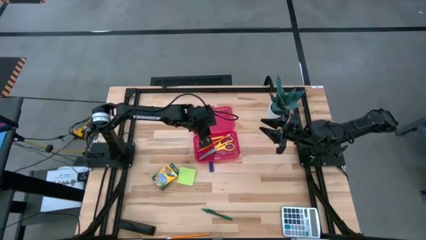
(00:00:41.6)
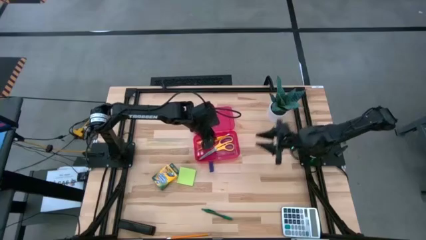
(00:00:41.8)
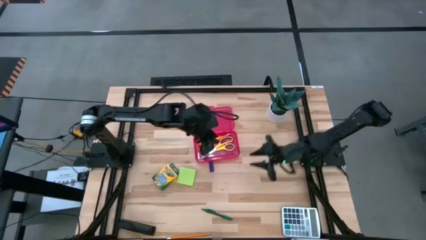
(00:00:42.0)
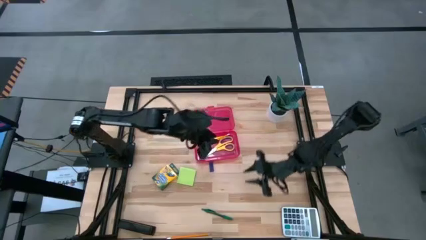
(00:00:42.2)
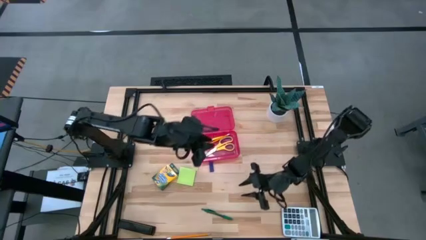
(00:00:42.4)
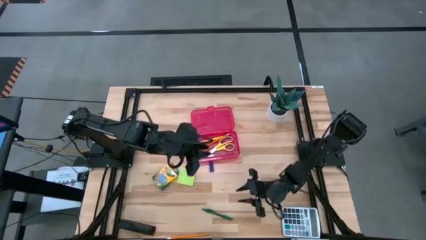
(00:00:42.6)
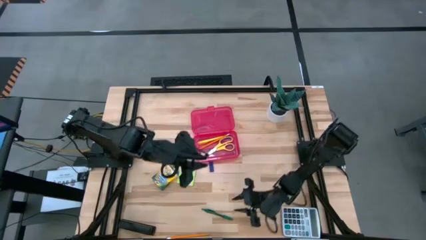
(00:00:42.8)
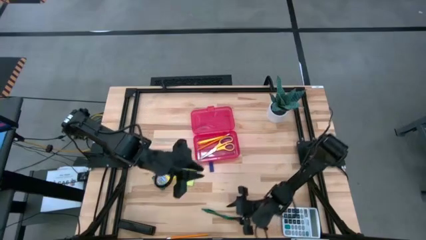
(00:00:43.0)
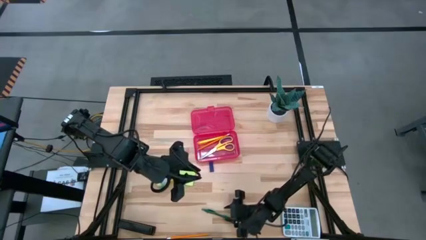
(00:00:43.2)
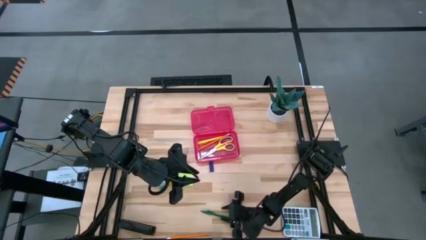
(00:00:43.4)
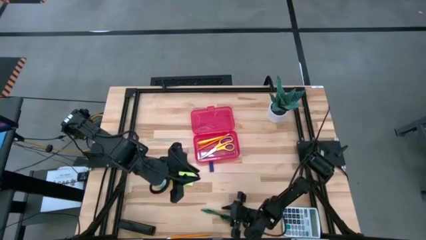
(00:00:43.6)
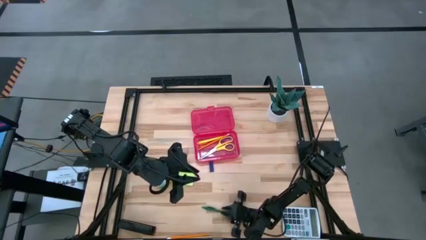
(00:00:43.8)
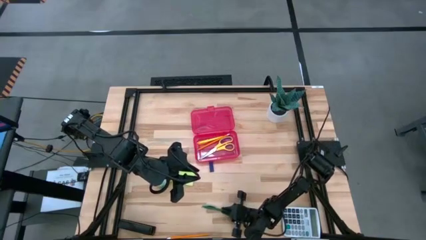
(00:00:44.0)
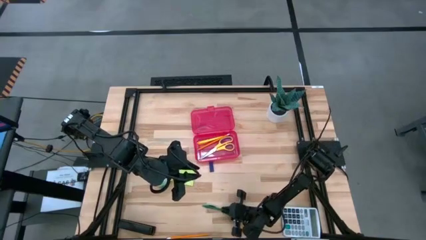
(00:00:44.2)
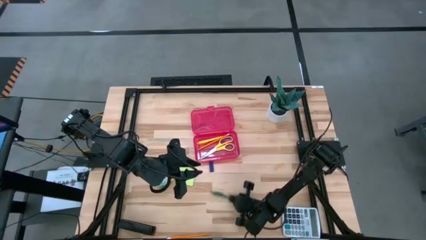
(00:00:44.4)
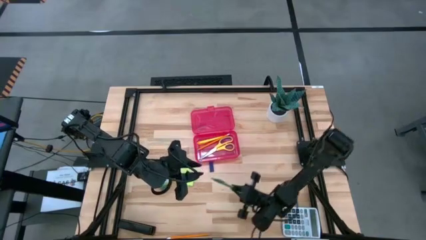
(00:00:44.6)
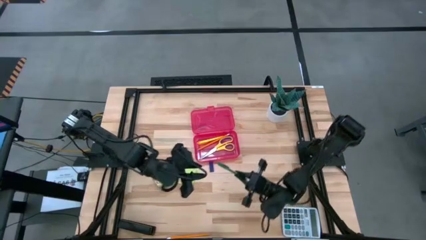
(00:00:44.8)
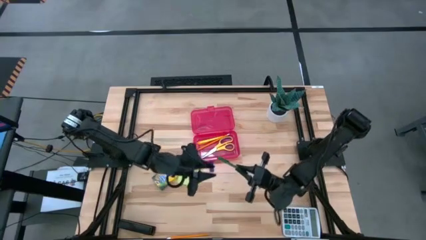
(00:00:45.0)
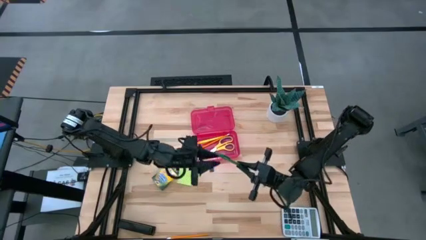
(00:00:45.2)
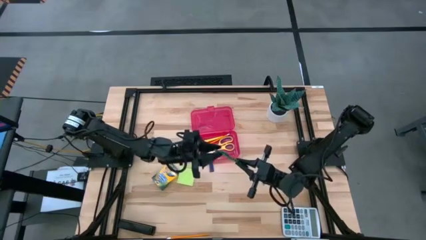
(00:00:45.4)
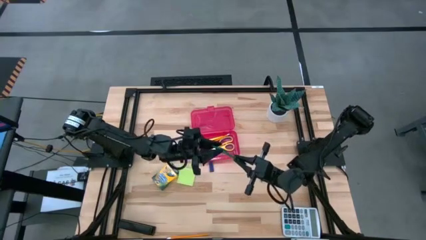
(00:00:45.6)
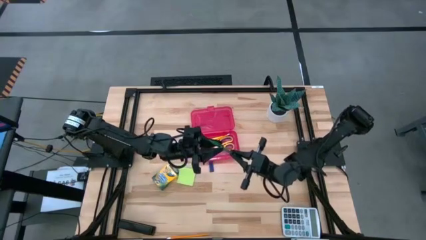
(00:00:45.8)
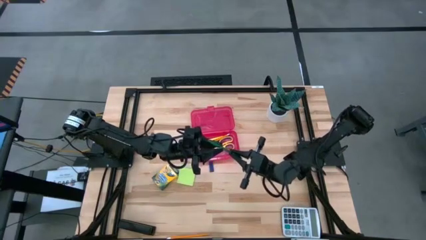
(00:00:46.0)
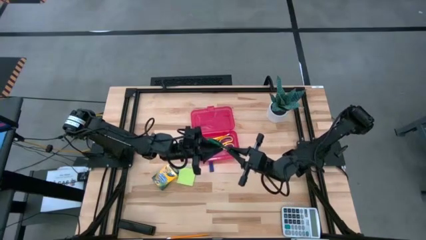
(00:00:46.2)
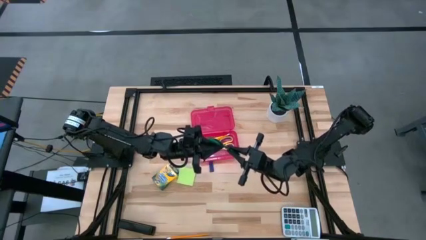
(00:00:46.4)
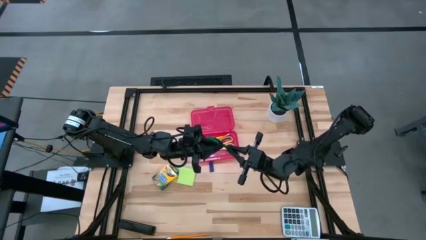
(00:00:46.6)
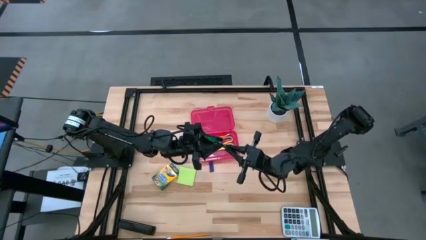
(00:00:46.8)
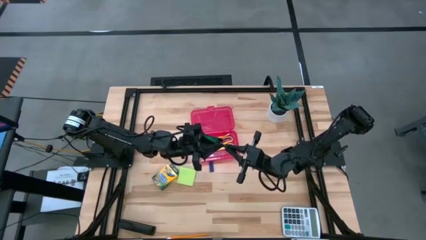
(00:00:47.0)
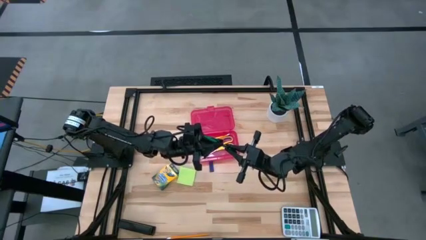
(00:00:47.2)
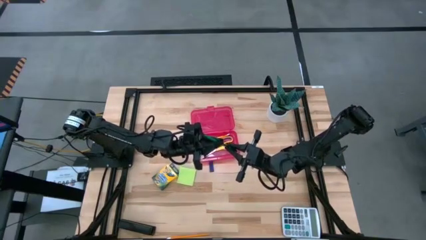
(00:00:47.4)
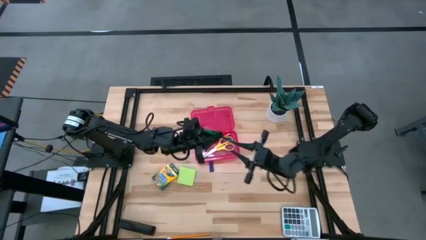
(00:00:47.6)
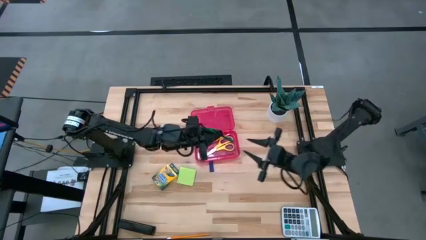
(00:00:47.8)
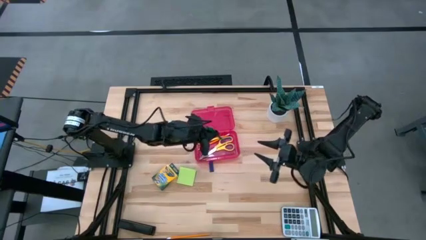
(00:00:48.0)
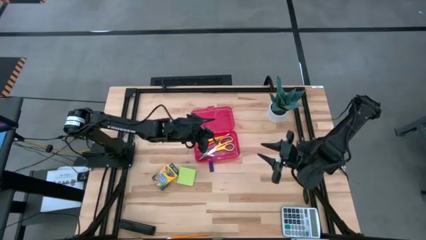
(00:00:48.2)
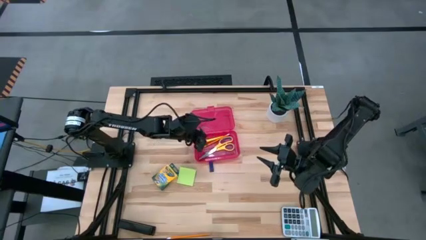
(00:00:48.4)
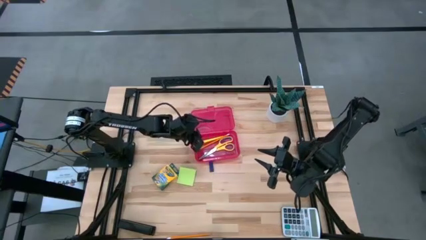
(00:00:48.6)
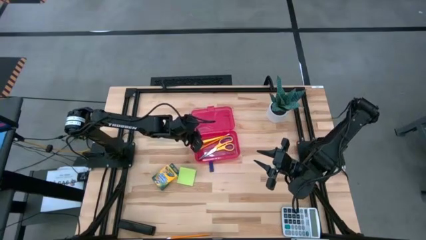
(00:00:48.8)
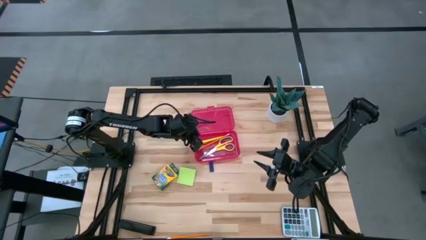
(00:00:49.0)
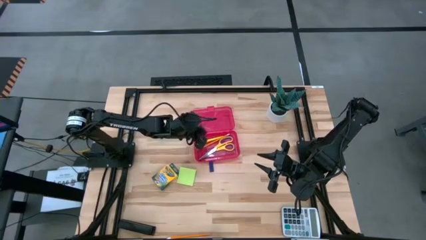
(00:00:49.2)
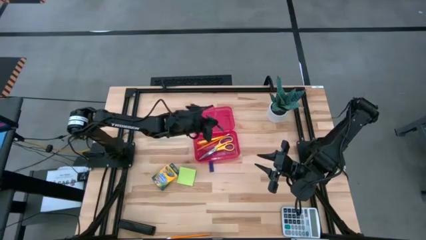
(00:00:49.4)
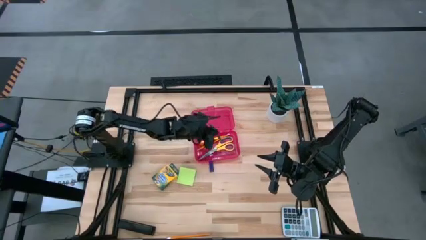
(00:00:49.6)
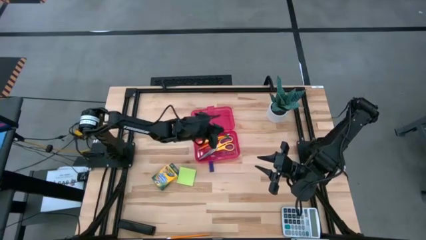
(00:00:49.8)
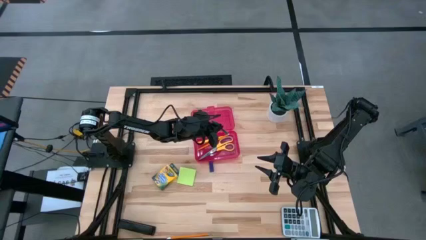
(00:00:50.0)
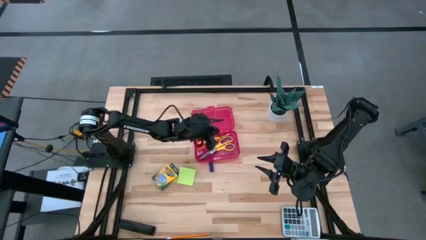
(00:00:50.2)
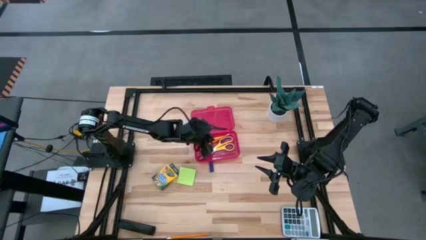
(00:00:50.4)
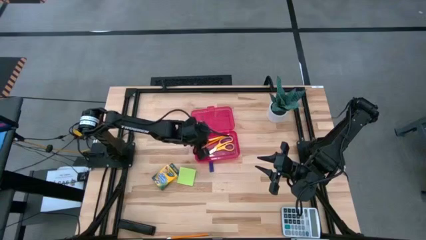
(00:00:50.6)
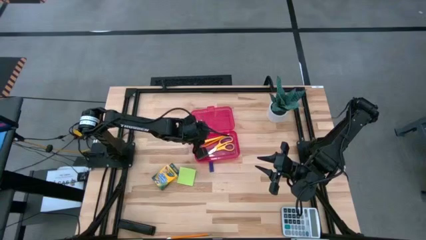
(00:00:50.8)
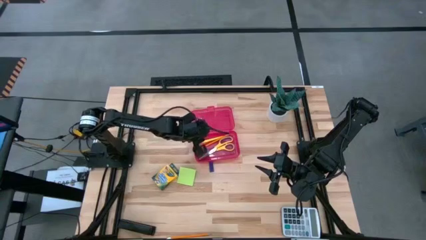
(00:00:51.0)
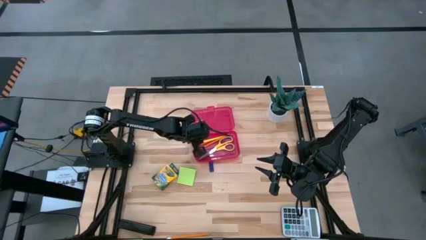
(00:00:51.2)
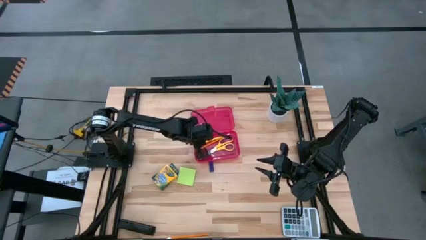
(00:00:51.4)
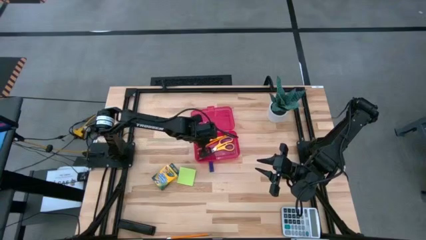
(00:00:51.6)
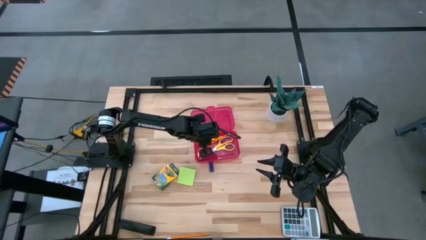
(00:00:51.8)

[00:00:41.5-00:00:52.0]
Task: Pack school essentials
Put the green pen into the supply box

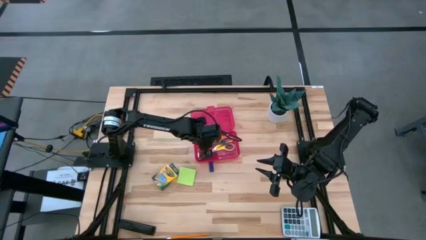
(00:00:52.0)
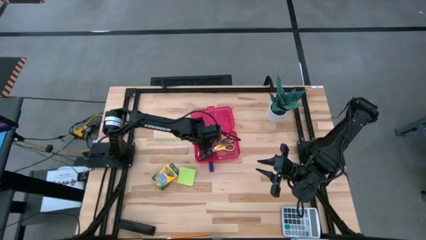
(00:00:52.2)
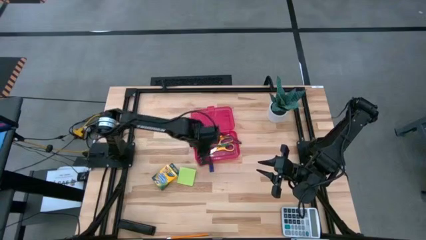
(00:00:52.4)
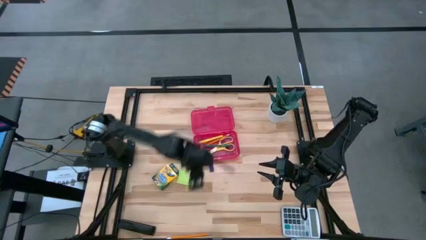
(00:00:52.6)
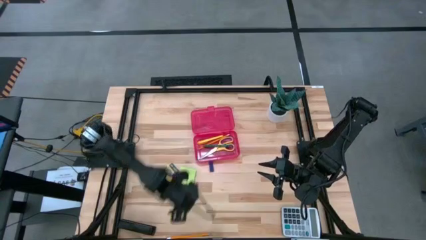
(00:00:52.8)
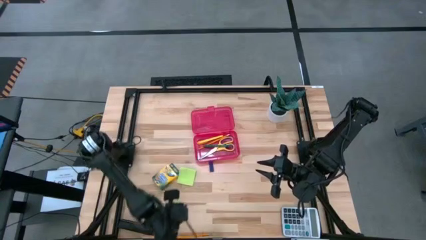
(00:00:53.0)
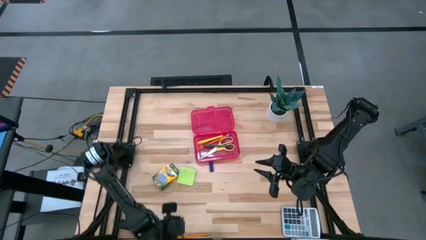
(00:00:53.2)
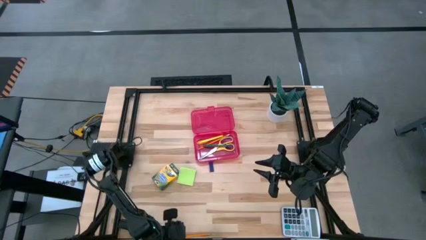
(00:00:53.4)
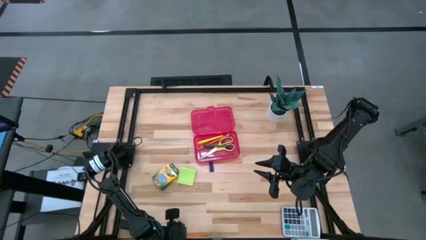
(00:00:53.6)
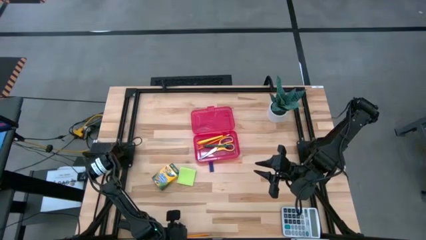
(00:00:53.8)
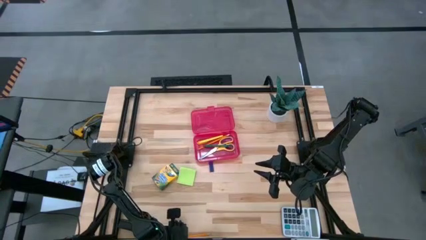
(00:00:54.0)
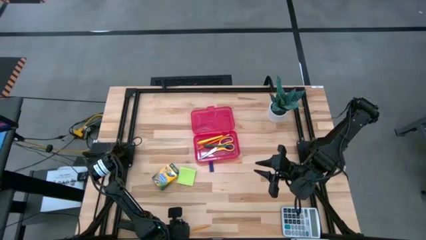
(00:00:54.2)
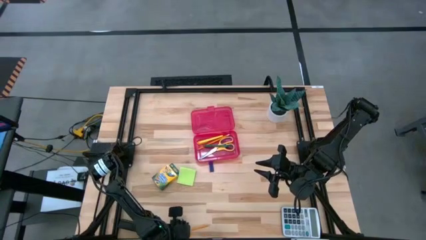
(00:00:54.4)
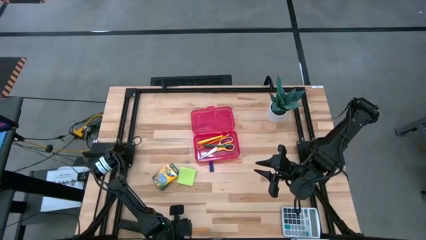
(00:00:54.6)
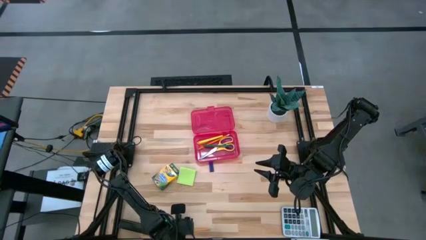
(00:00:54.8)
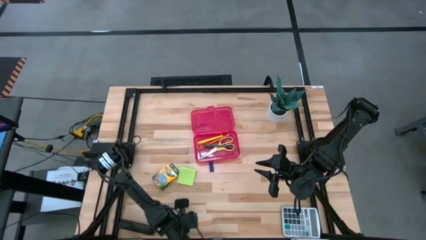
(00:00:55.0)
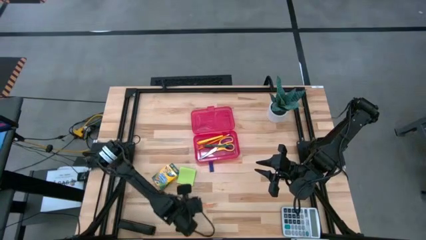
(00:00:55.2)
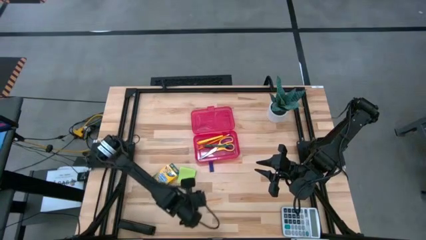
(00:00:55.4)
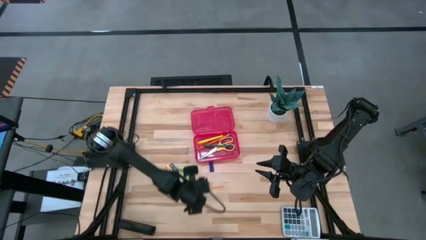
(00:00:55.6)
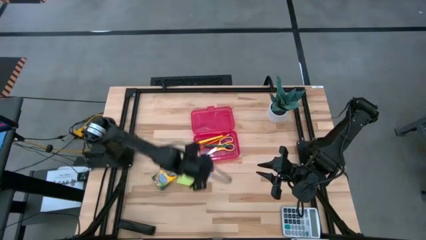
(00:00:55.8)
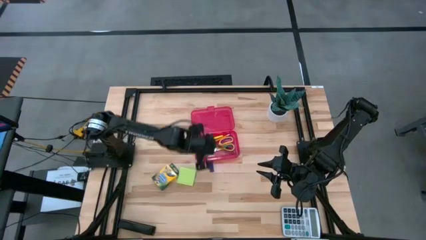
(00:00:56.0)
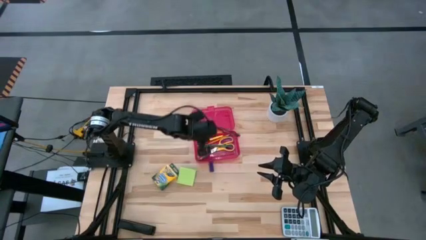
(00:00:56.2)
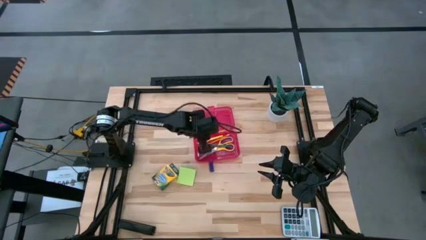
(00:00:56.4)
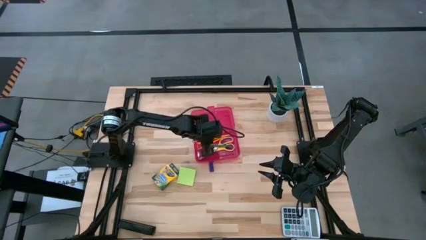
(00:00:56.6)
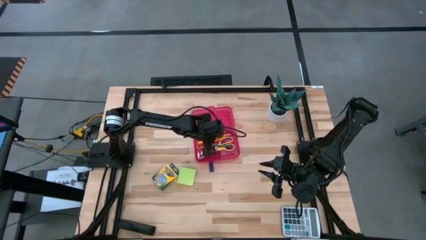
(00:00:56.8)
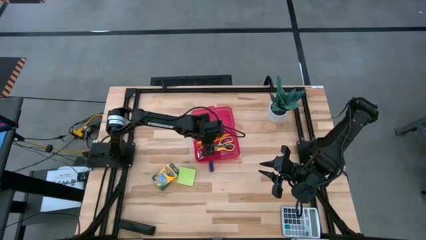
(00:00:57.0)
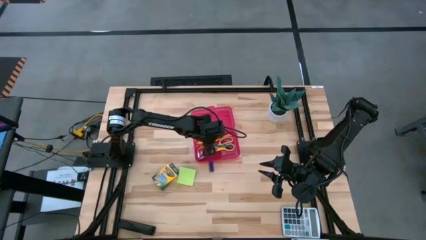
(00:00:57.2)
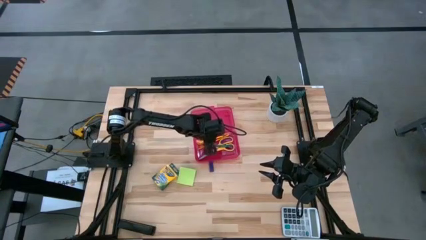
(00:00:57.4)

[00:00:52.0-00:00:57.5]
Put the orange pencil into the supply box

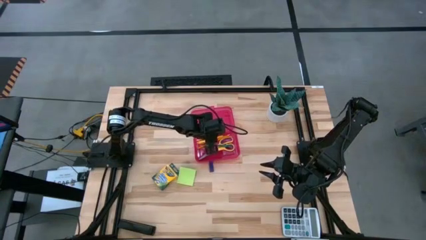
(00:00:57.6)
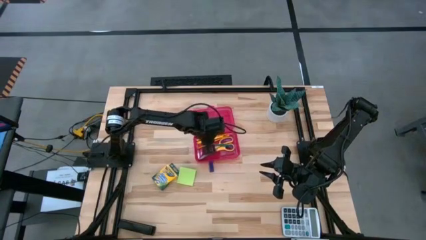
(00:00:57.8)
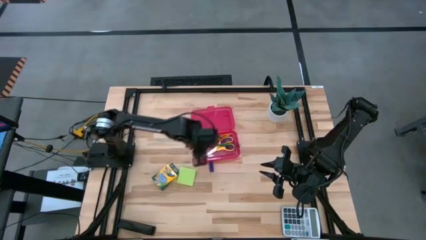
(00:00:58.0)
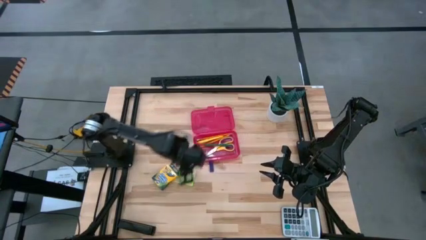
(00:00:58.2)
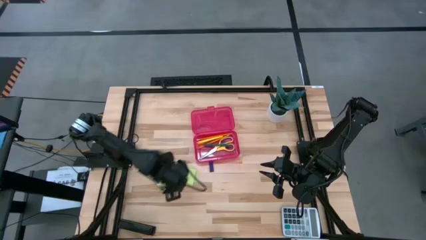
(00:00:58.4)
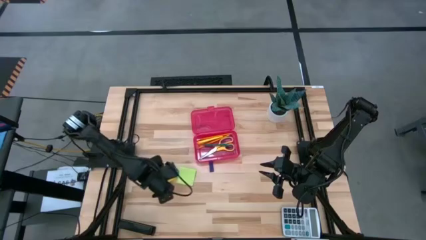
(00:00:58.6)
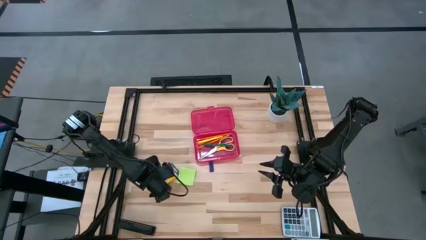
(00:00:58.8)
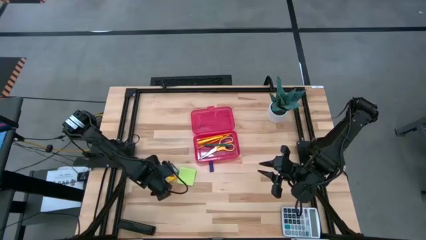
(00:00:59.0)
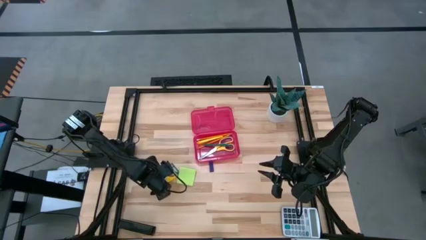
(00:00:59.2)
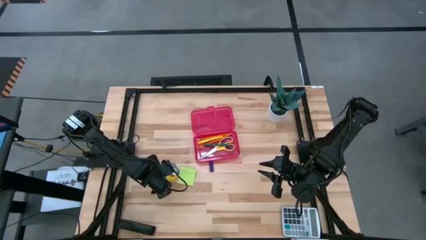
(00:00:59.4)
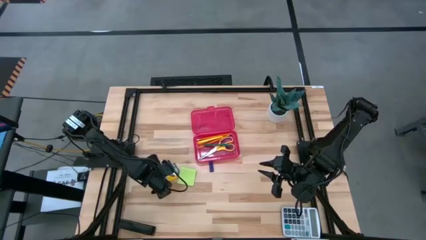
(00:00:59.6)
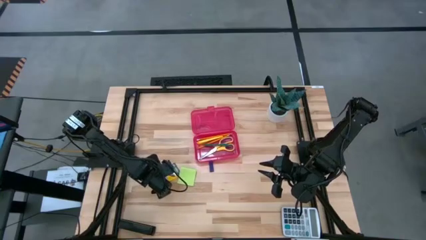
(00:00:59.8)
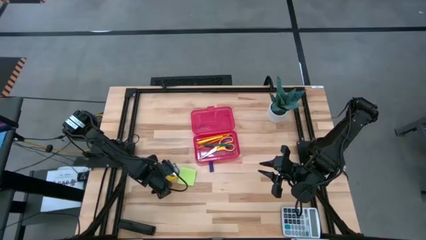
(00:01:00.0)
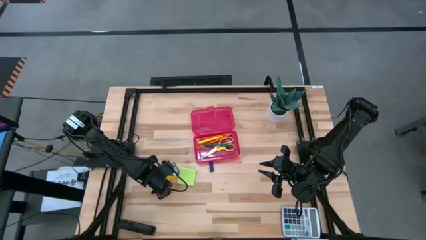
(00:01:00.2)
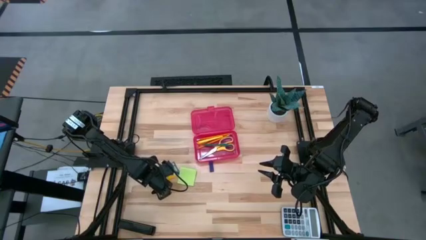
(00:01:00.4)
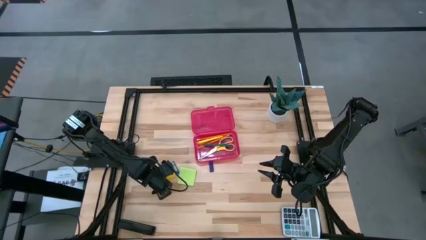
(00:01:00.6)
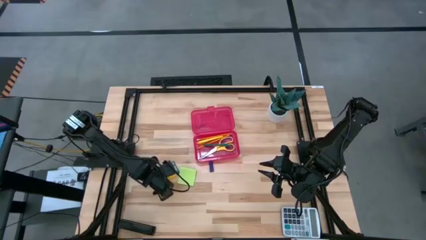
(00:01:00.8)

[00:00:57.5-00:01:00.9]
Put the yellow crayon box into the supply box
